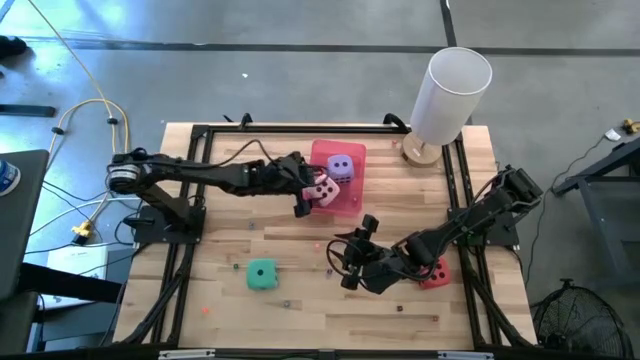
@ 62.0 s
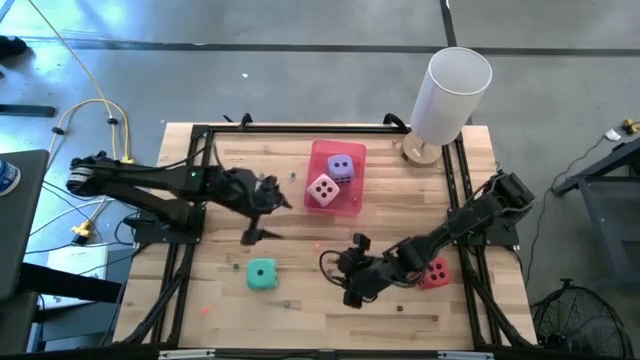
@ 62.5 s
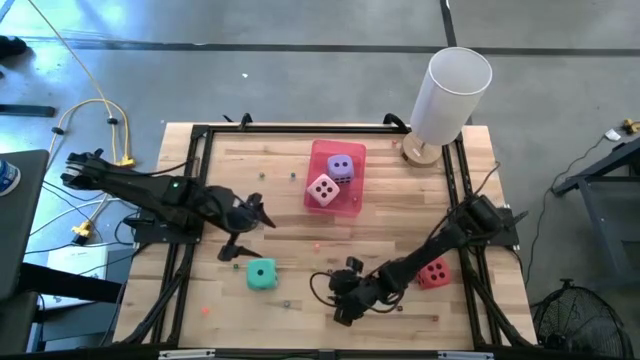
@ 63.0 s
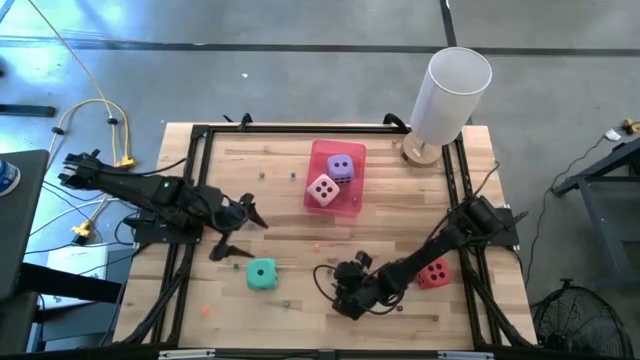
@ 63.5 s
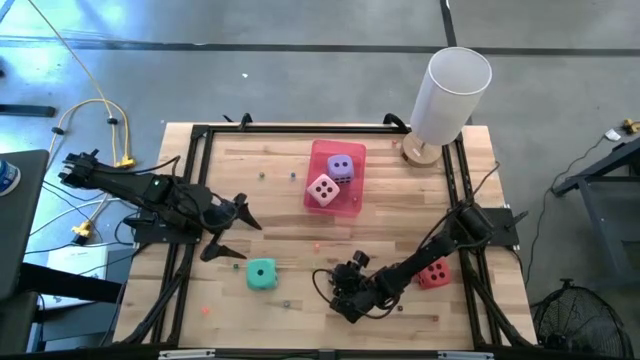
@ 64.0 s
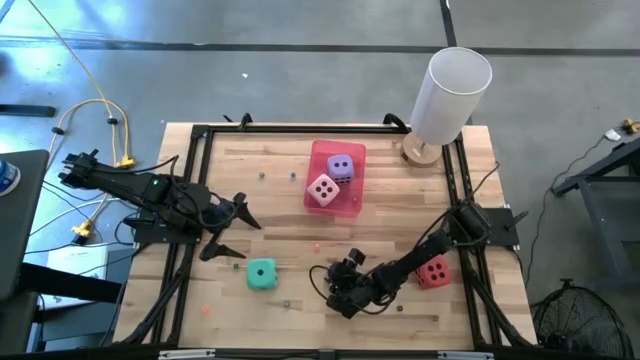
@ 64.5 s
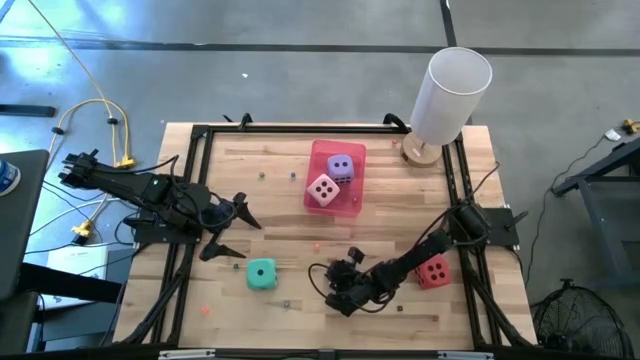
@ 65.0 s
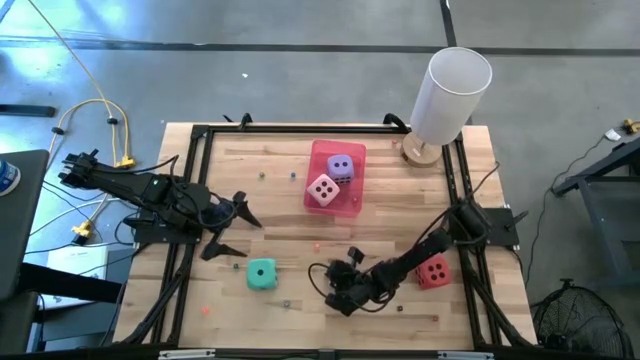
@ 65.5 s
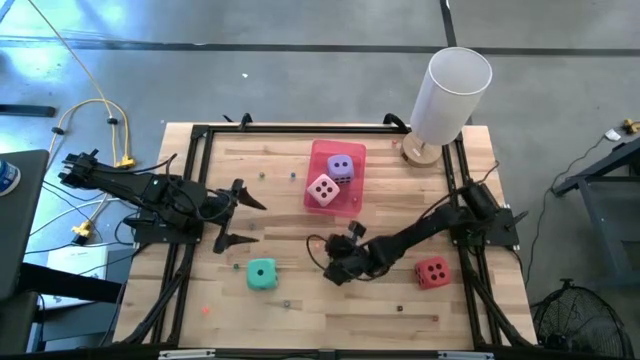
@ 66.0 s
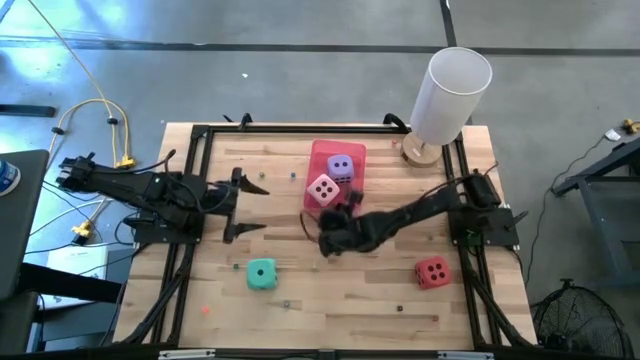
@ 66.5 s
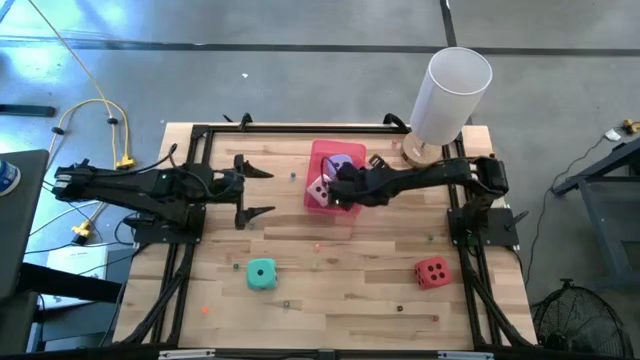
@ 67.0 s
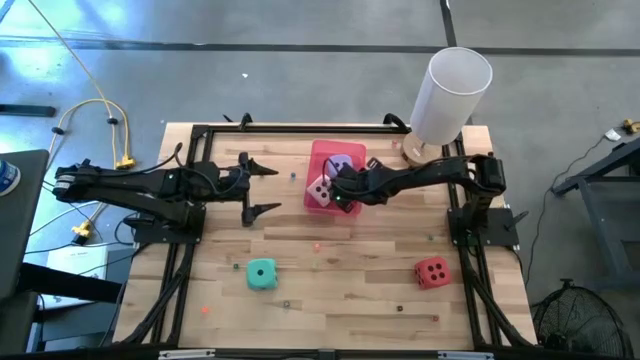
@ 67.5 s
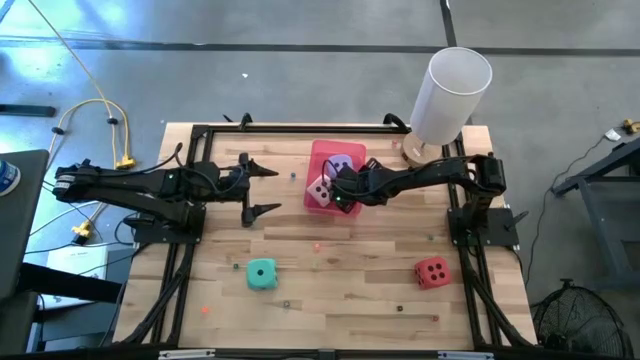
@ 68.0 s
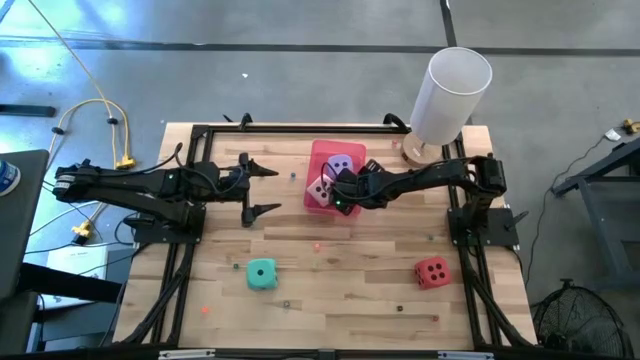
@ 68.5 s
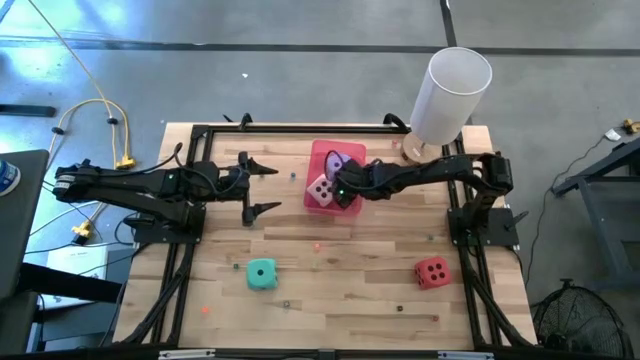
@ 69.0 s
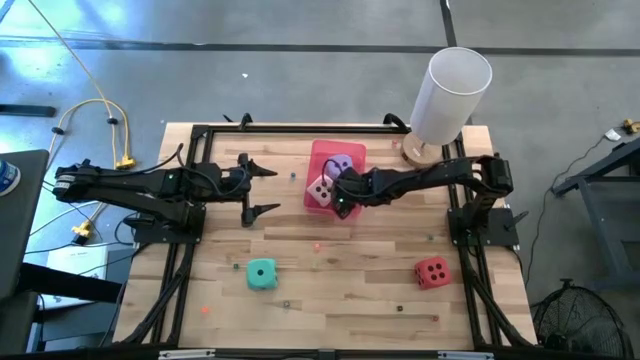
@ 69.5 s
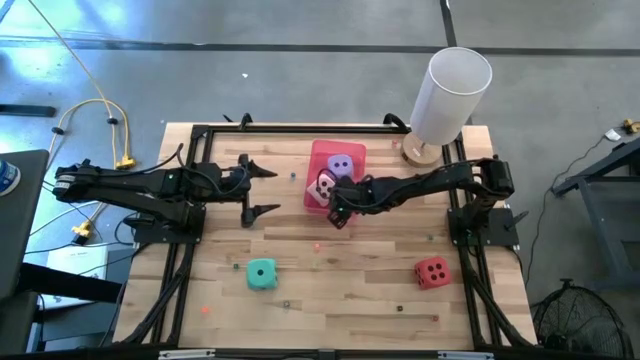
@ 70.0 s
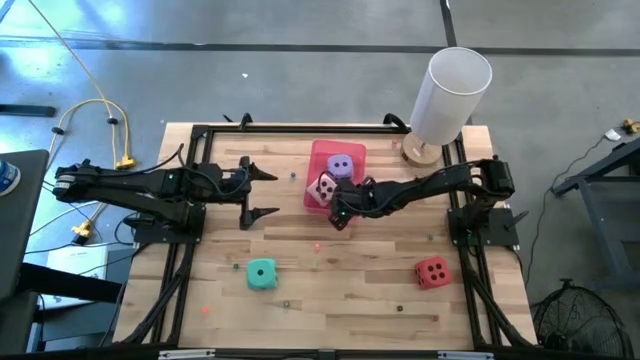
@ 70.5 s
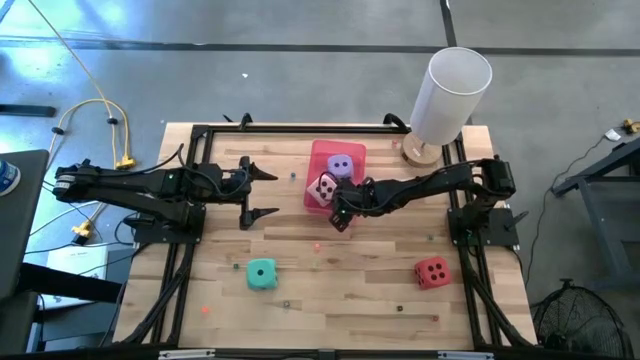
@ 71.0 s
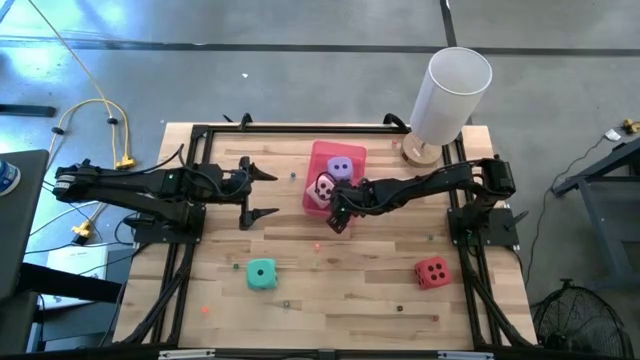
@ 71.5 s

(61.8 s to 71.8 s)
Task: Pick & Place Dice
Put the small blue die into the red bin

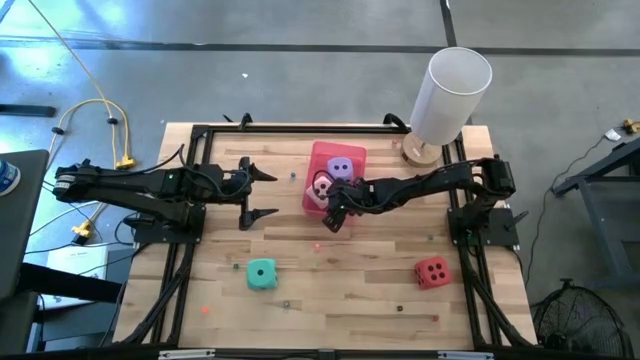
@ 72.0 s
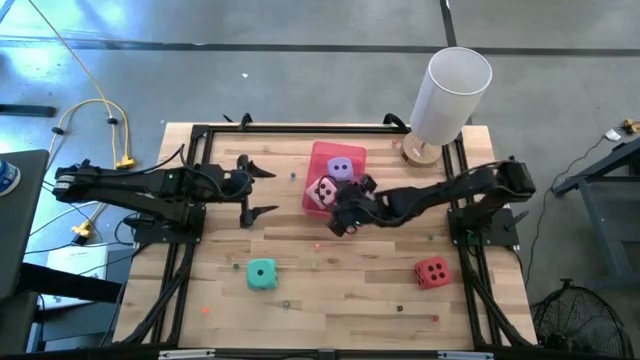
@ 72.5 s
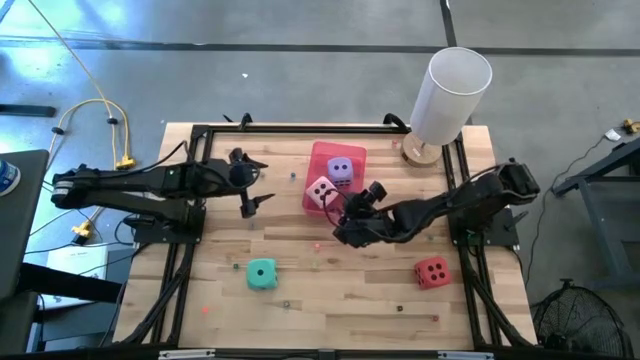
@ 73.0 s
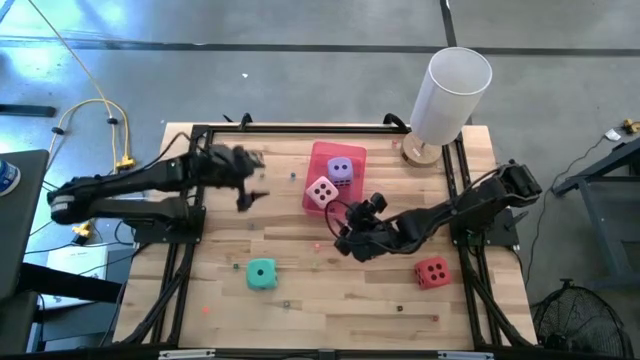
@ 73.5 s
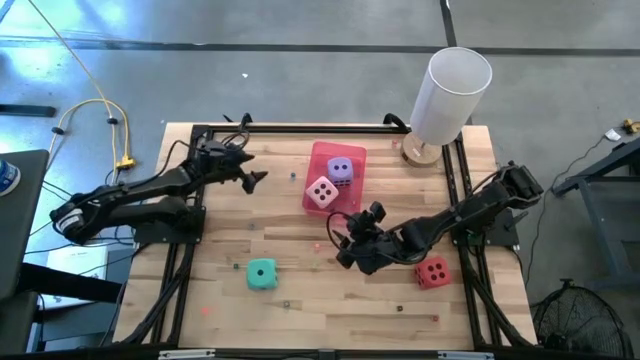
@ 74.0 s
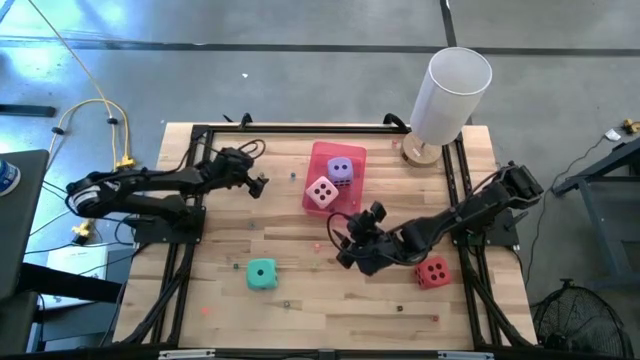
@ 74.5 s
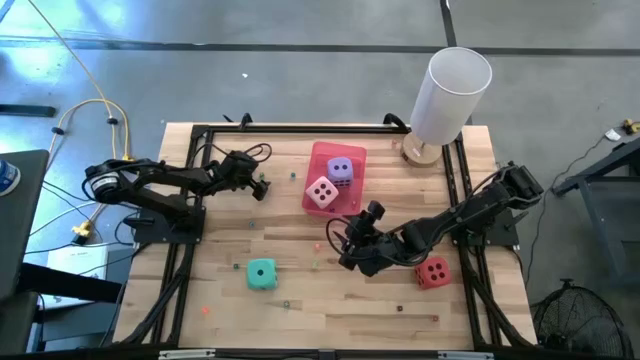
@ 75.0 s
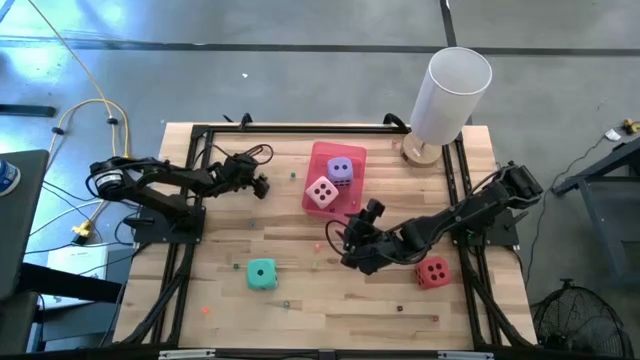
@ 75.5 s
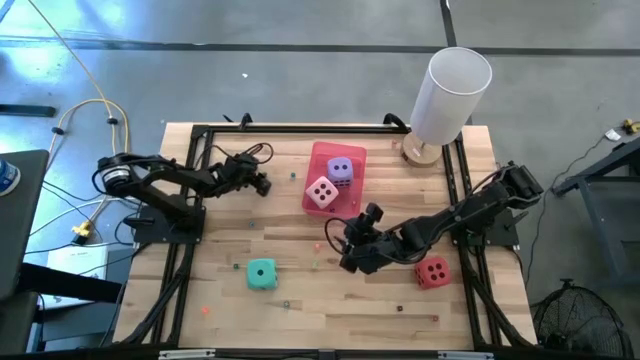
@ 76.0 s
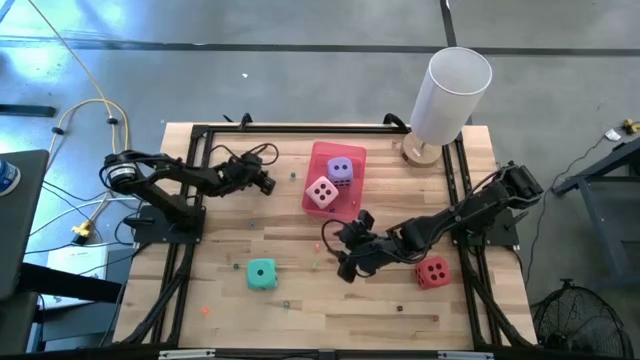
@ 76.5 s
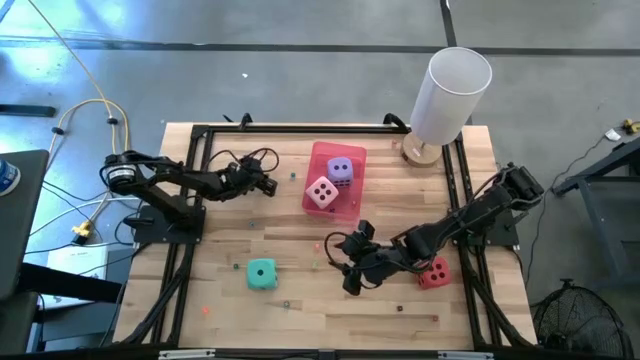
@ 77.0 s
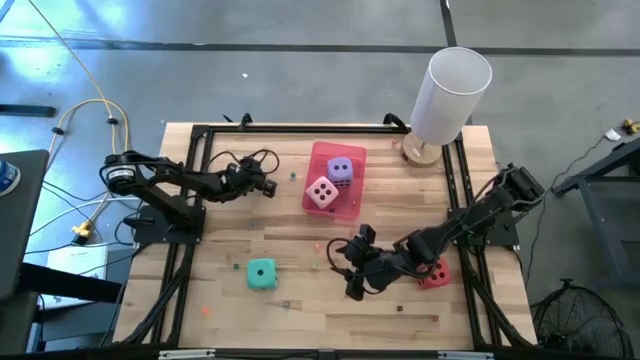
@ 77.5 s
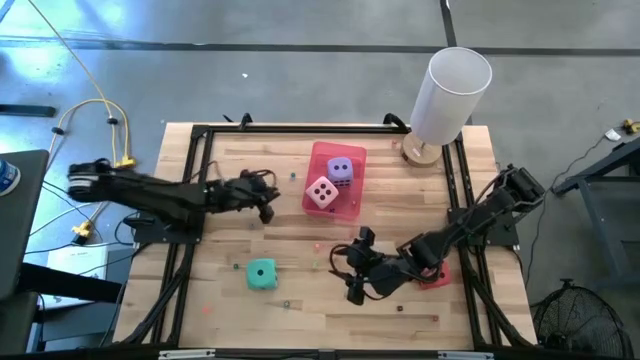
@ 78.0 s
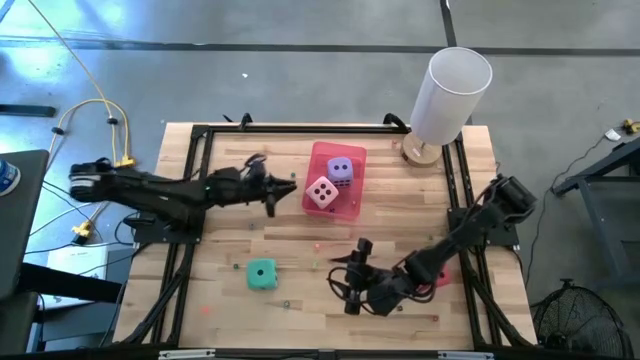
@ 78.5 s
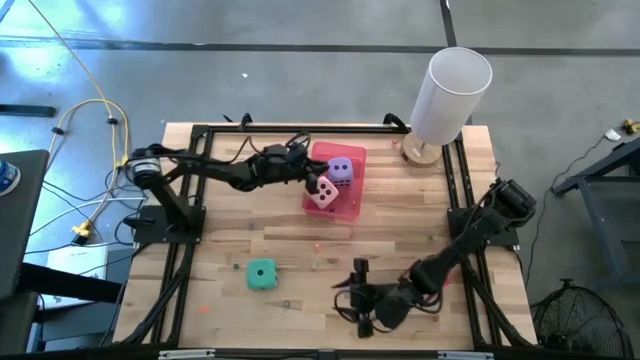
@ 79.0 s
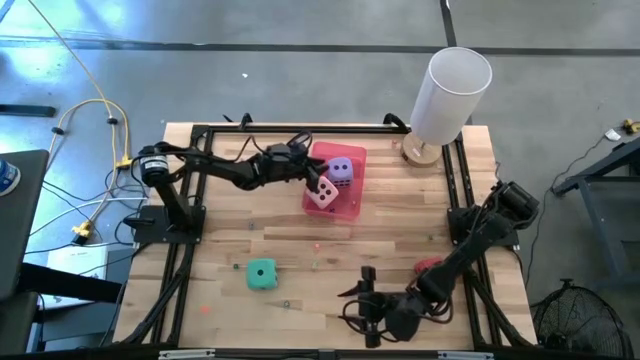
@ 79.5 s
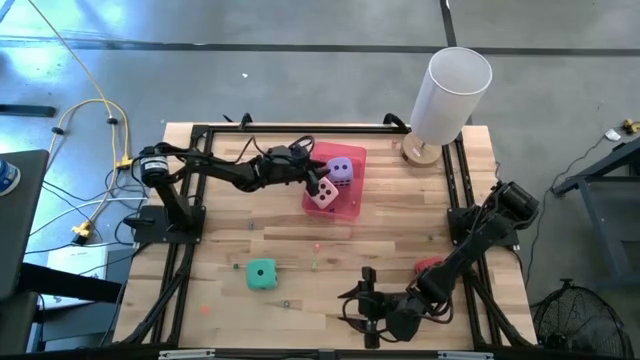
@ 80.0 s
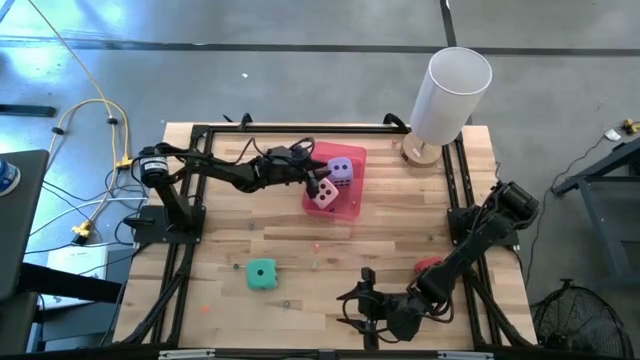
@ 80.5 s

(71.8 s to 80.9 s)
Put the small green die into the red bin
